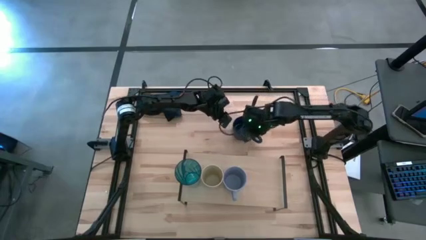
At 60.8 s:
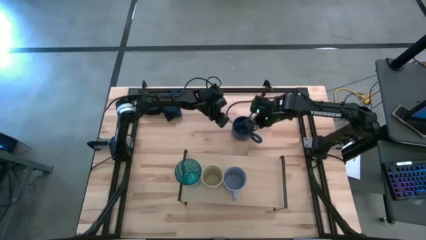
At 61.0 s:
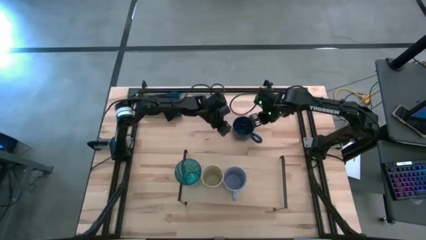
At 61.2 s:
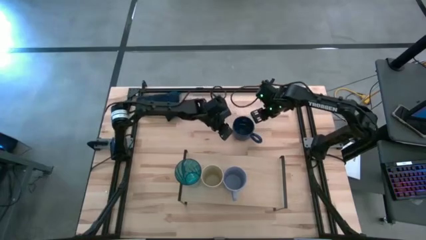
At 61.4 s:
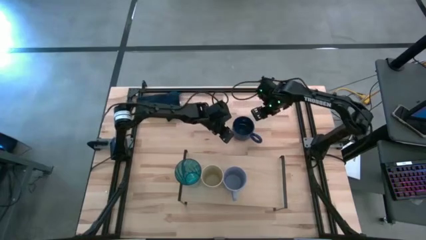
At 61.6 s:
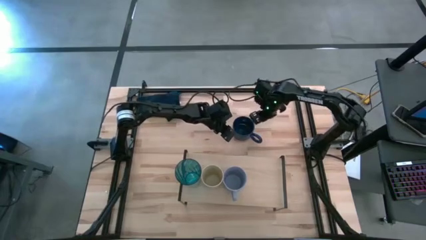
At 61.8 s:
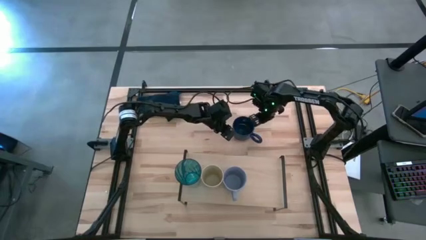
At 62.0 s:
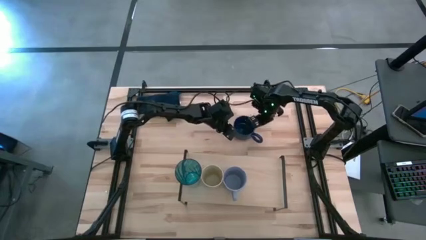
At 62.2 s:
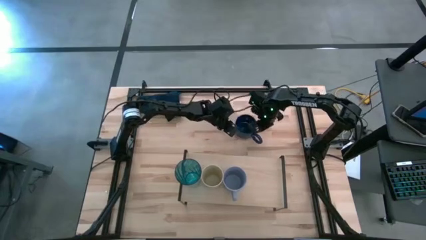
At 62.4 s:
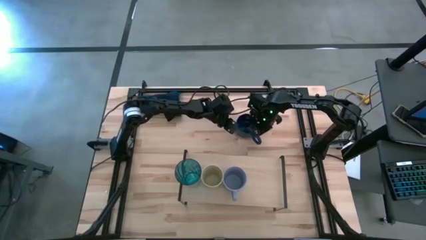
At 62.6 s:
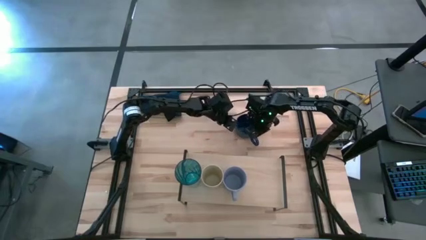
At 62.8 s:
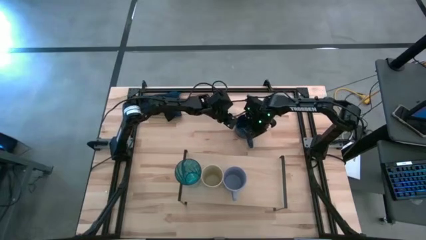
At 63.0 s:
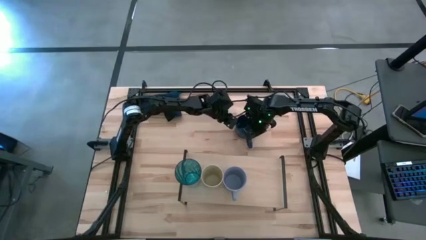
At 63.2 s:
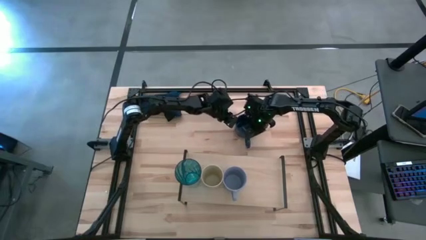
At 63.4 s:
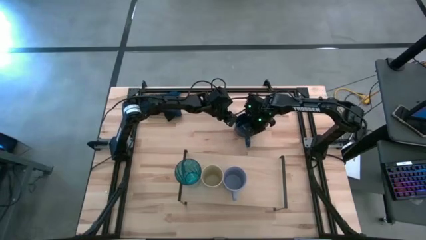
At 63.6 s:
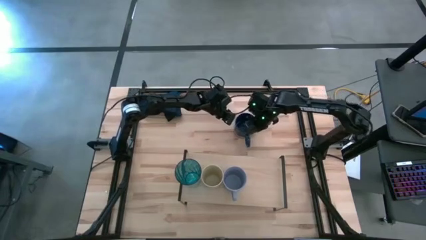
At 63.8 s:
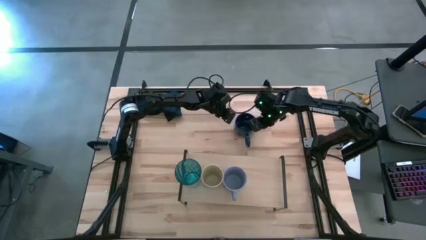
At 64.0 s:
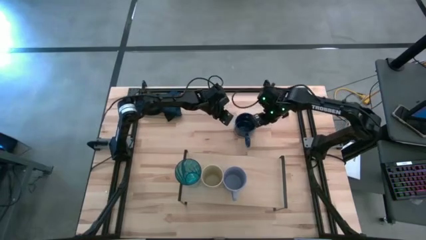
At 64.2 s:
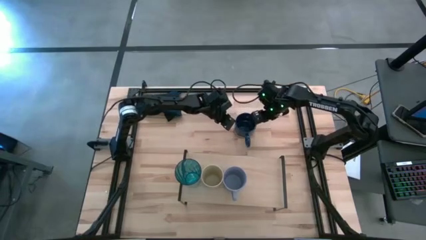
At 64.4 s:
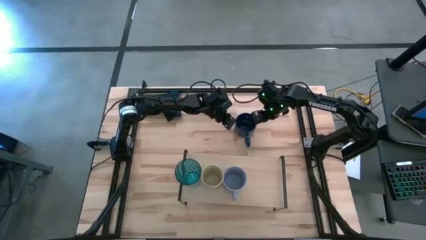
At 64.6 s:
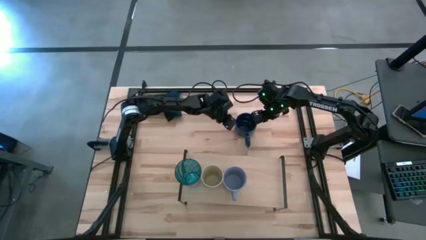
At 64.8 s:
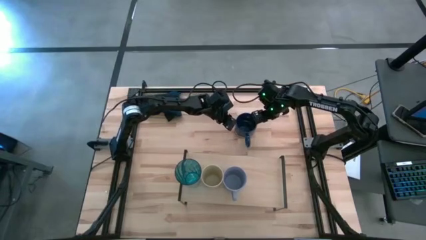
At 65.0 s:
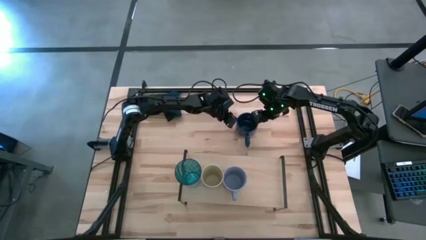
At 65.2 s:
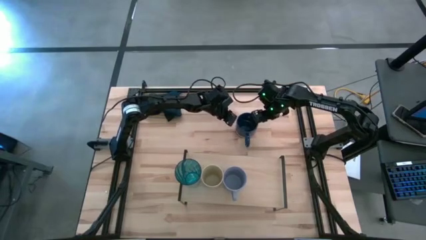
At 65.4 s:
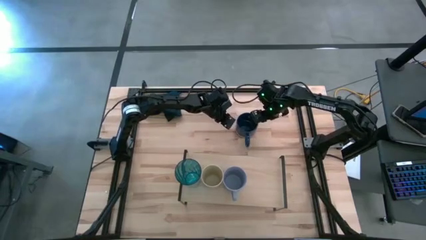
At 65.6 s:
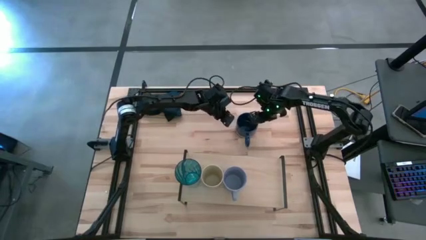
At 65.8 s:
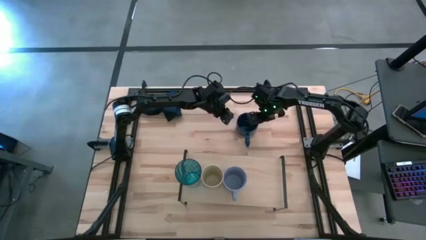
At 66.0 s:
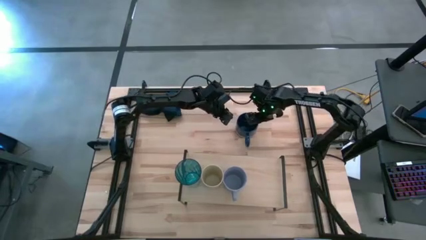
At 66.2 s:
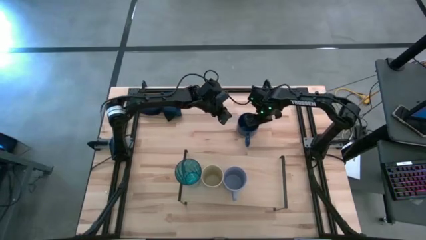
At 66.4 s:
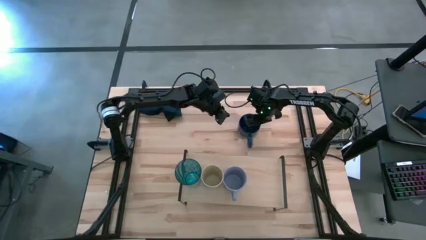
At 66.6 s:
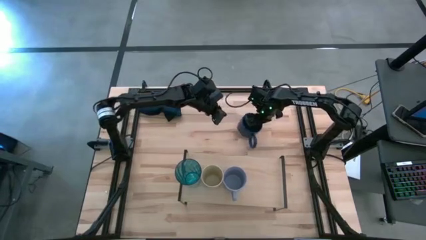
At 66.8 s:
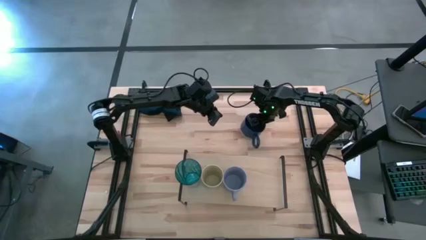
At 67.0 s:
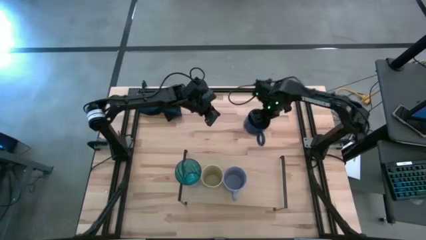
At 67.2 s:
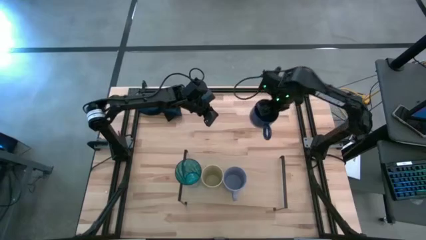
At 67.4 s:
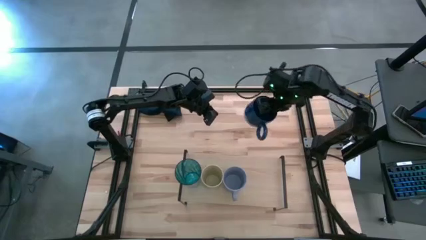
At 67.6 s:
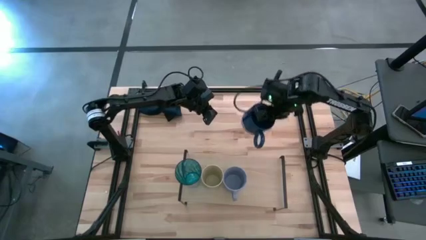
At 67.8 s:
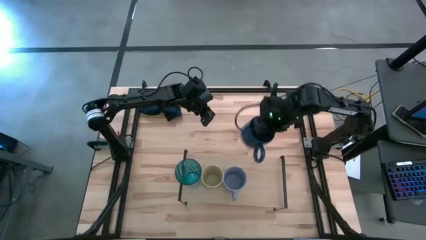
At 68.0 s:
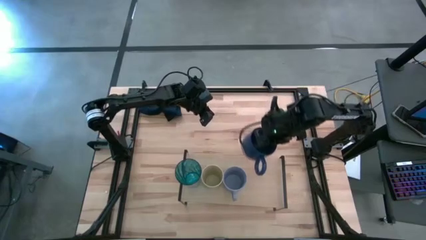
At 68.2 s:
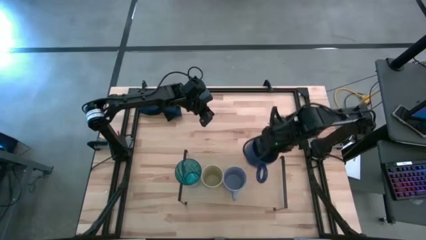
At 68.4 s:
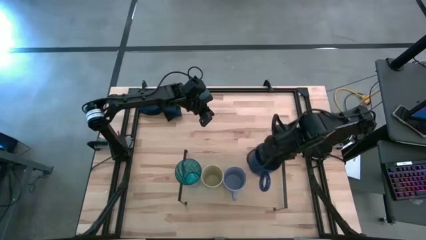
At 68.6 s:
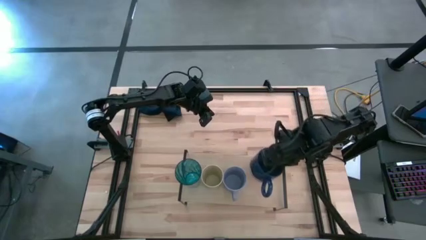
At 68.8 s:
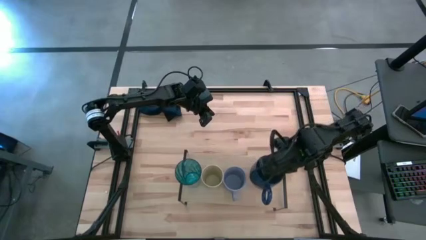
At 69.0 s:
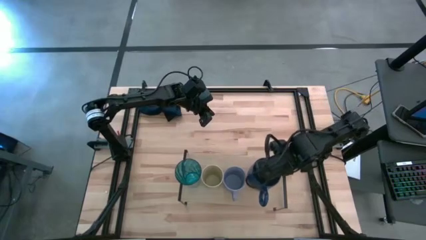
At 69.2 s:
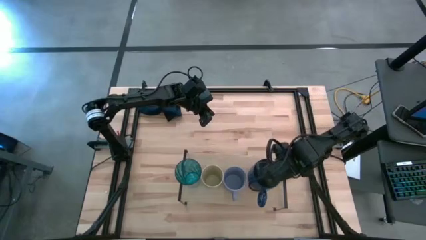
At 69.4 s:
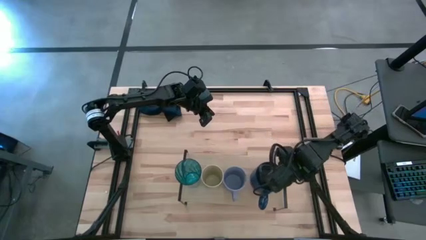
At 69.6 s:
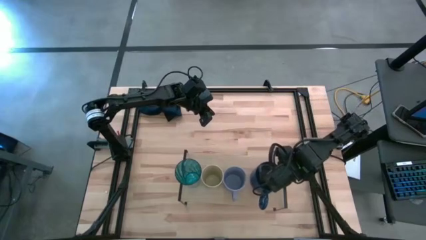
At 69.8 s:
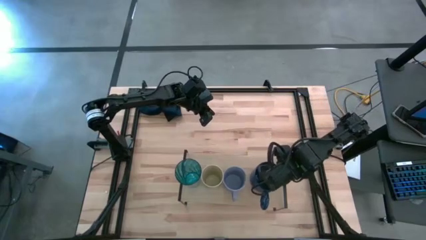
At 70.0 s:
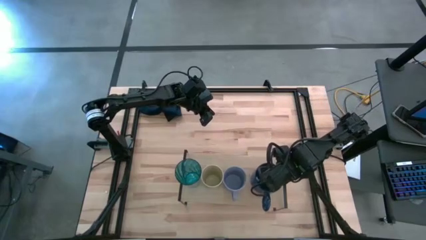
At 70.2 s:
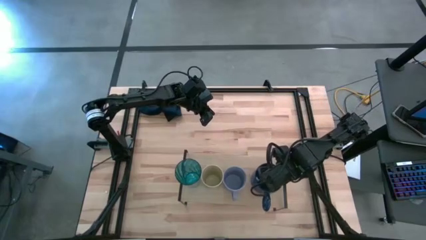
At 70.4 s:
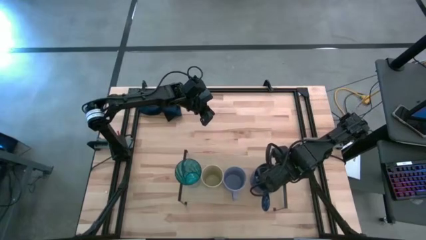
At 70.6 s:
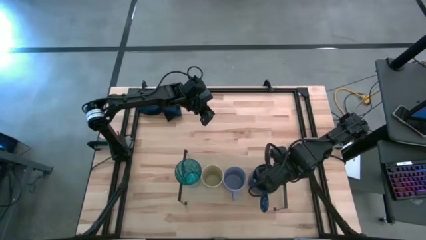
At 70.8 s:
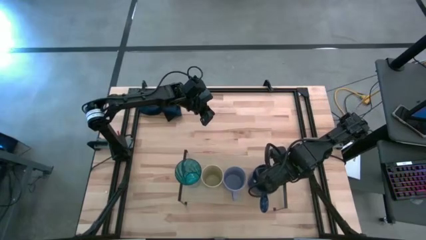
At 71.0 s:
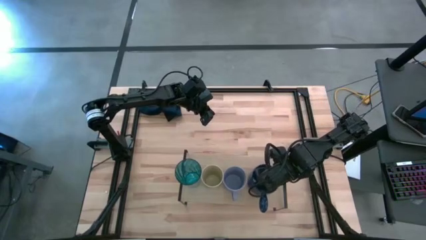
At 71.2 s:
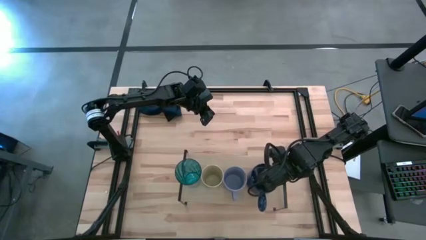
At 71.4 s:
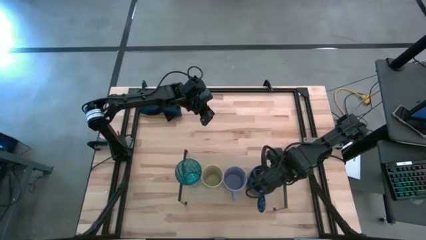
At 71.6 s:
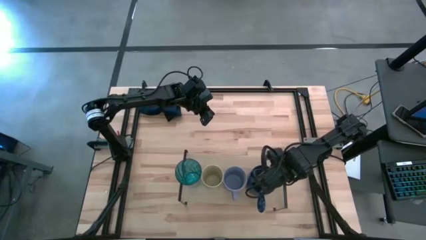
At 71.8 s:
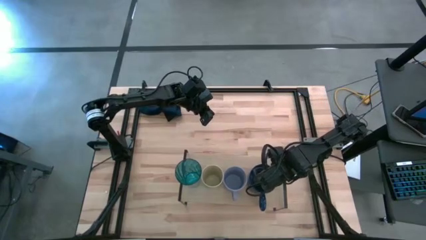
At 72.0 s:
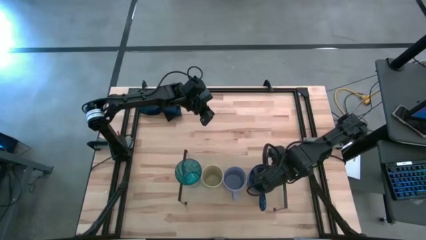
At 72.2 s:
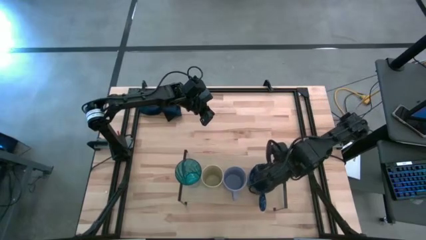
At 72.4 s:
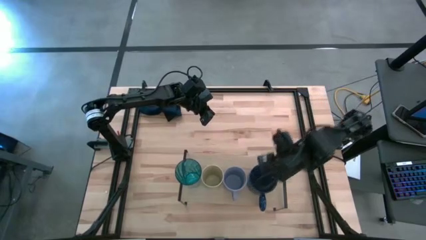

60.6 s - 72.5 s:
Task: Stack small to large cups/mugs on shelf
Put the blue mug on the shelf

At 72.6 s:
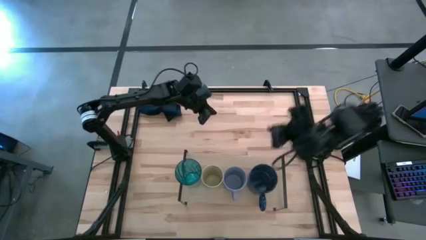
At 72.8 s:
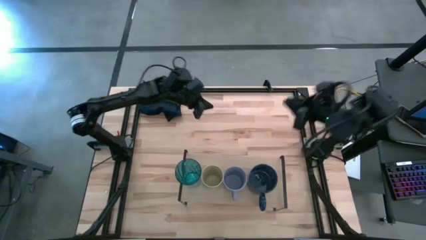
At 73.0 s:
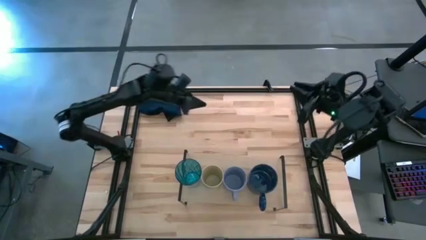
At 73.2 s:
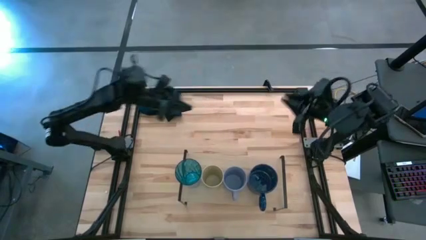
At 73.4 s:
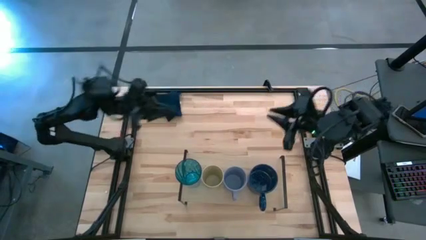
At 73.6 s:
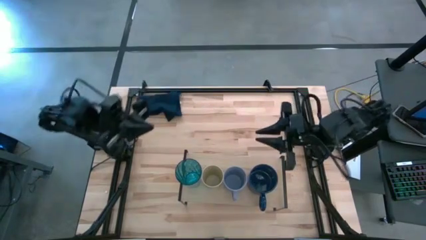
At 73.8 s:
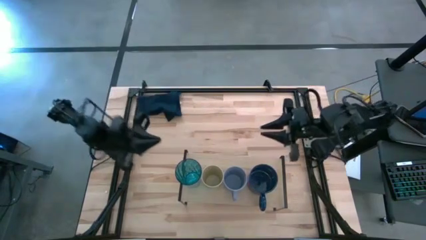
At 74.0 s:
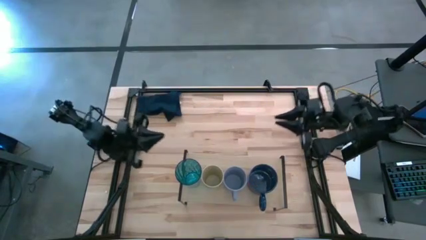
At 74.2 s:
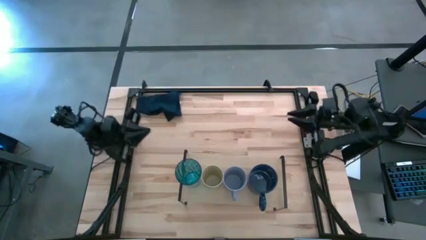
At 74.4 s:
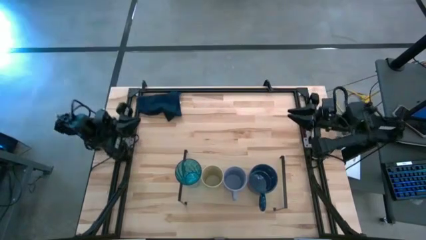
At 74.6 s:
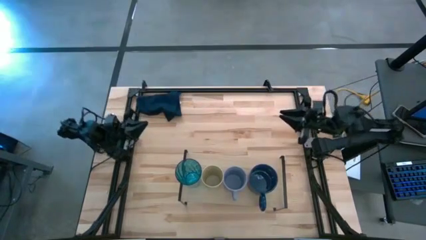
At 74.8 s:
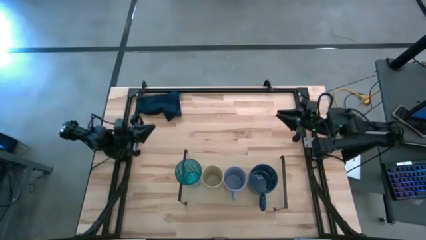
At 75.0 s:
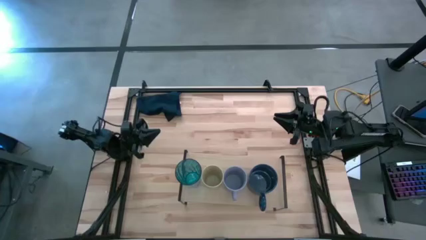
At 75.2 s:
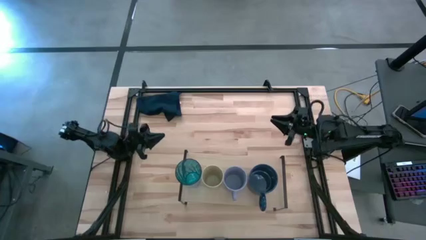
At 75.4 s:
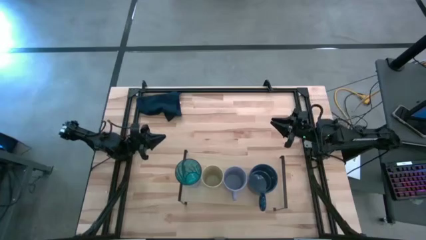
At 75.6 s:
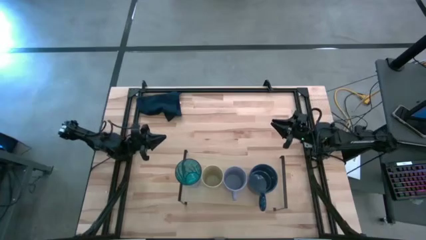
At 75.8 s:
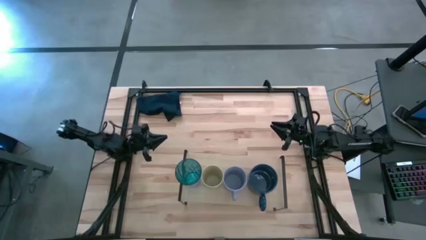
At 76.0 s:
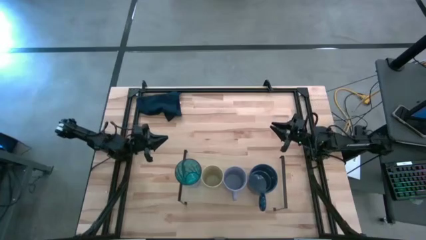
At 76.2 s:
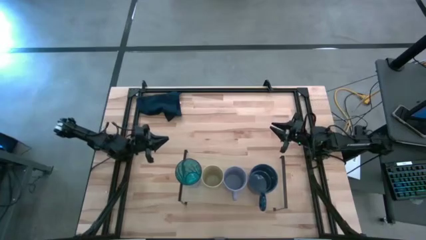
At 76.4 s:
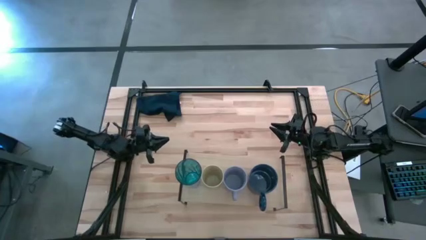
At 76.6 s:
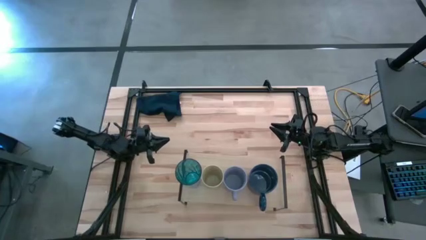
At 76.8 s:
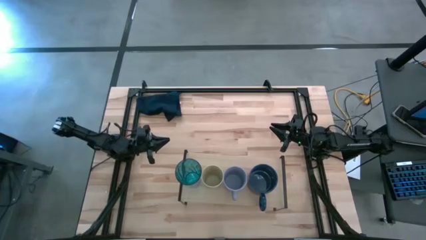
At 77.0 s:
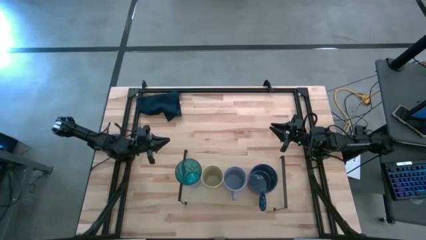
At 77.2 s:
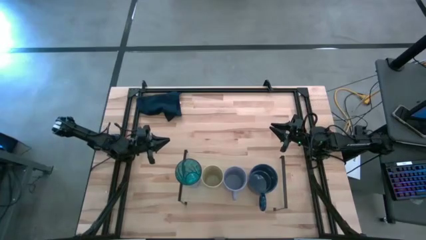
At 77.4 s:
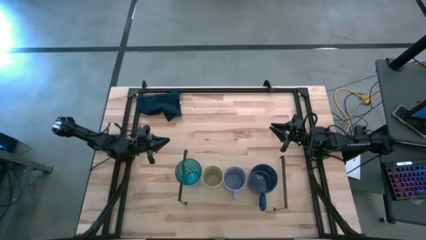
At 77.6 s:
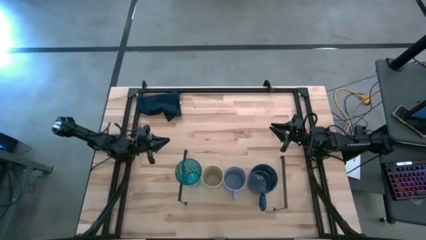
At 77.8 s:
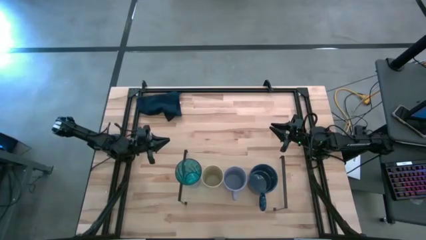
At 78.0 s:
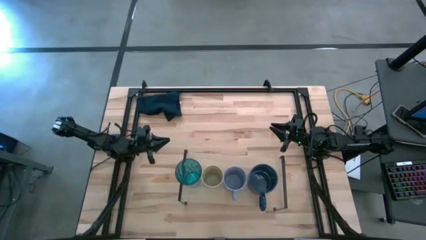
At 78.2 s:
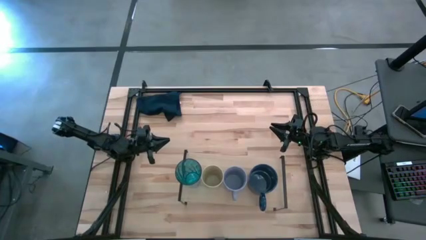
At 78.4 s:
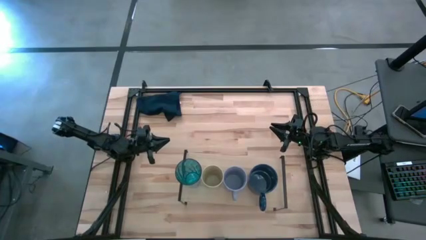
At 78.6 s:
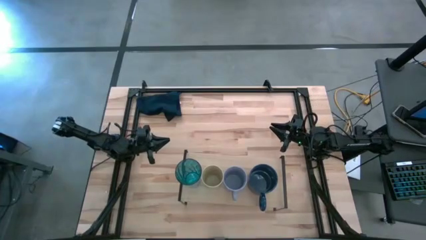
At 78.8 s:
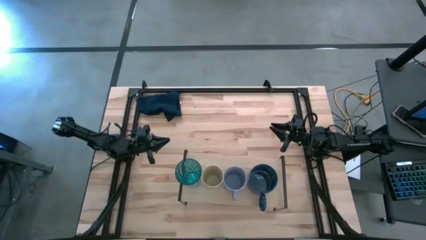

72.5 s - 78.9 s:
Return to Home Position
